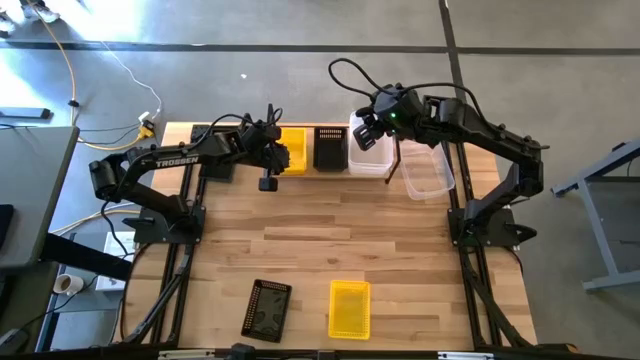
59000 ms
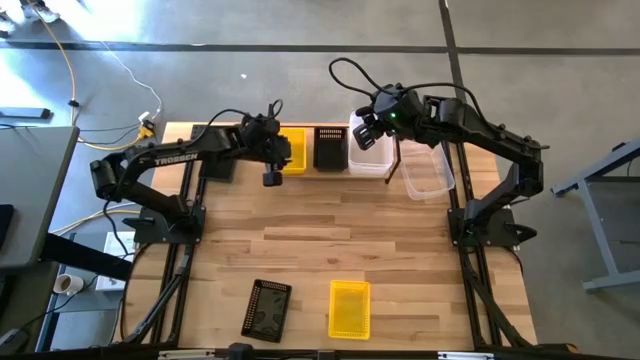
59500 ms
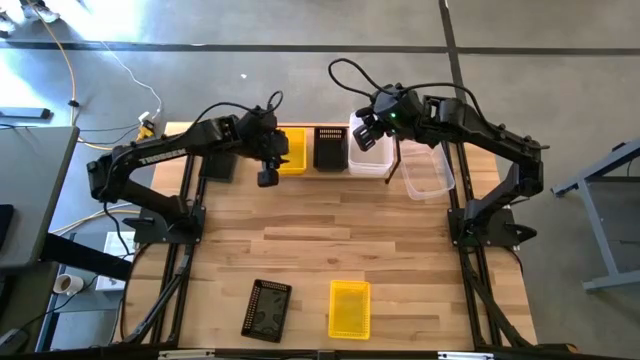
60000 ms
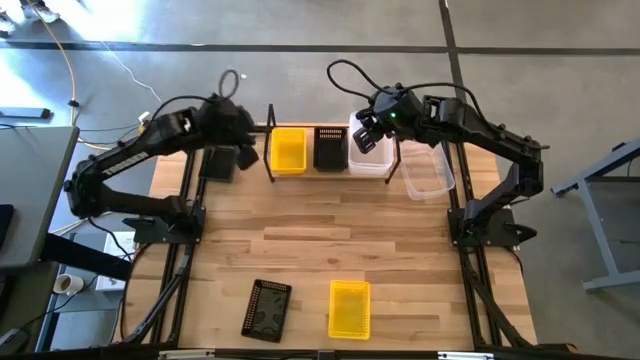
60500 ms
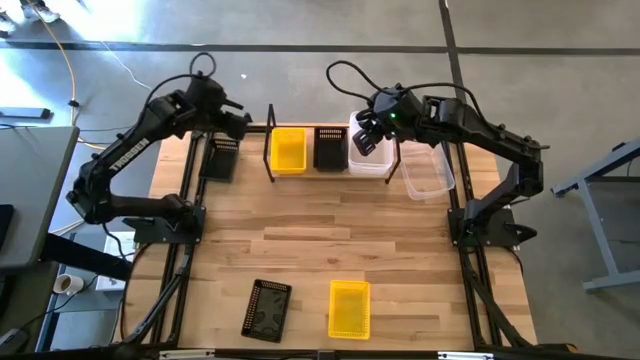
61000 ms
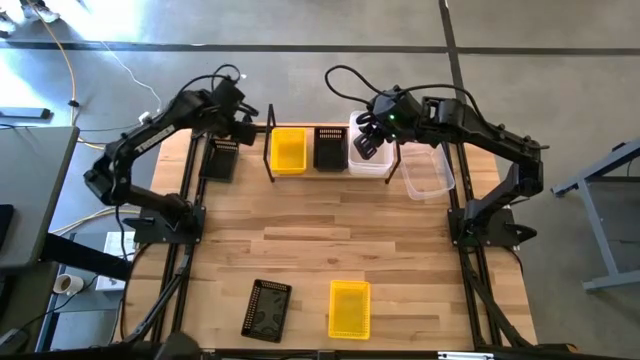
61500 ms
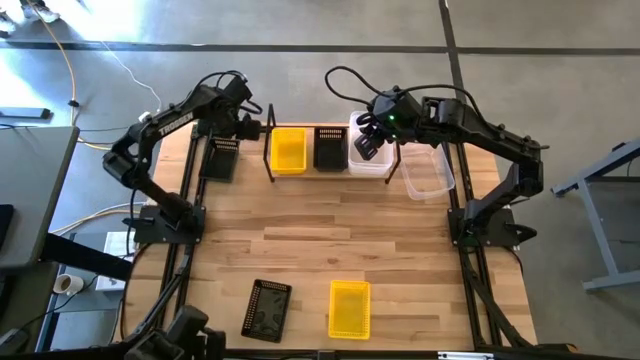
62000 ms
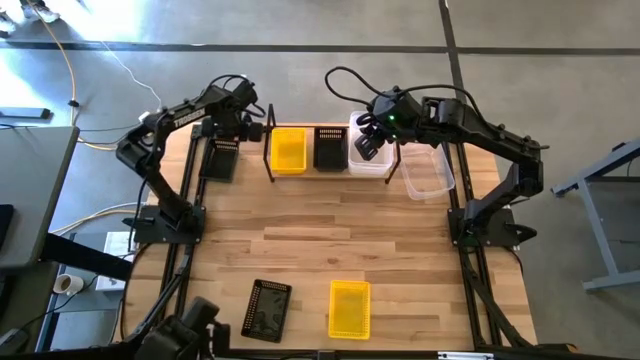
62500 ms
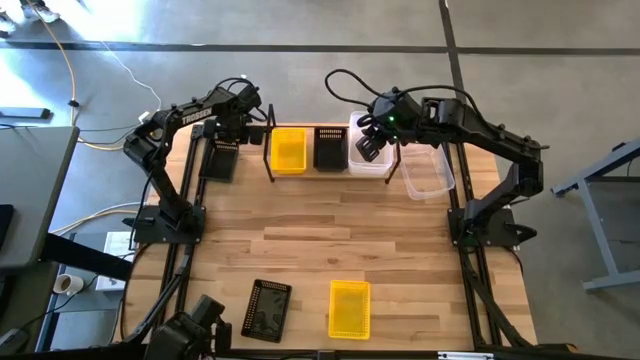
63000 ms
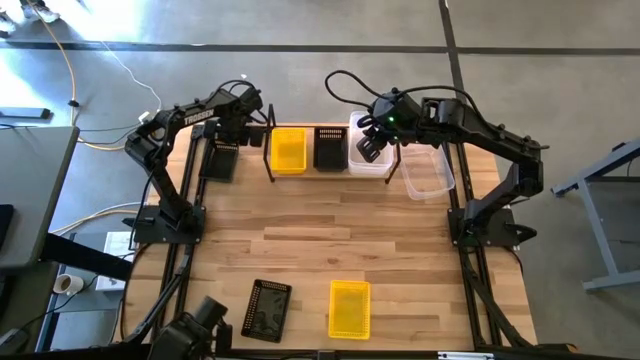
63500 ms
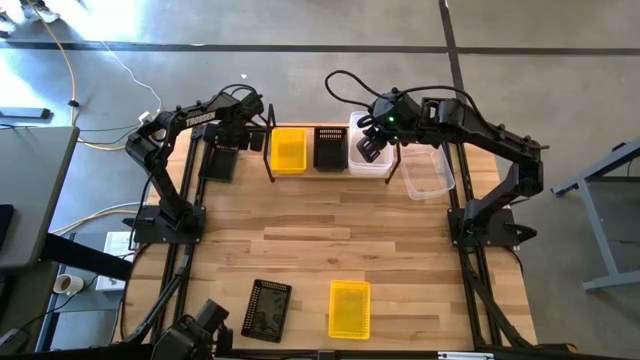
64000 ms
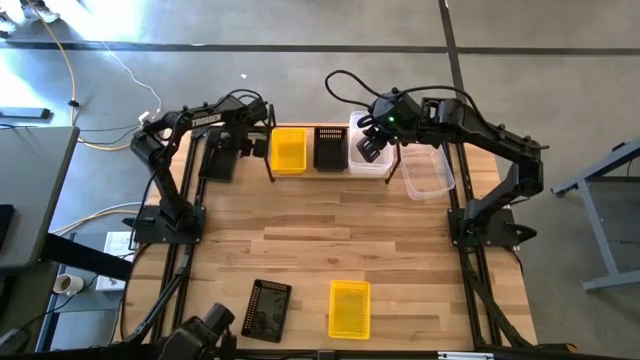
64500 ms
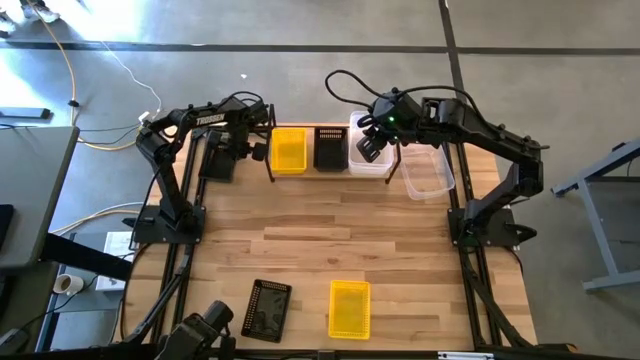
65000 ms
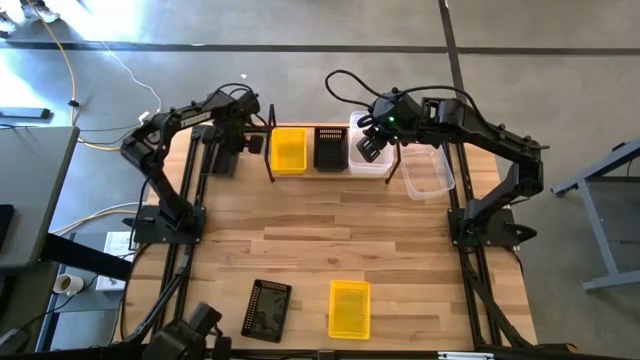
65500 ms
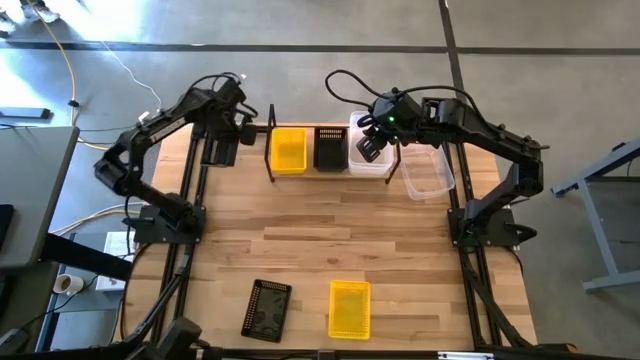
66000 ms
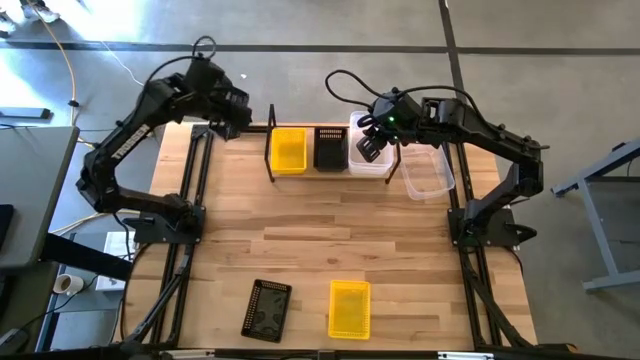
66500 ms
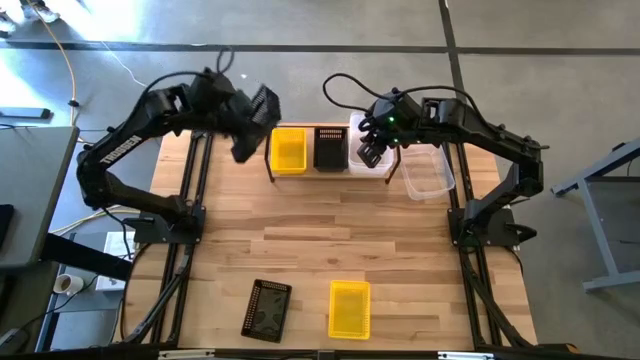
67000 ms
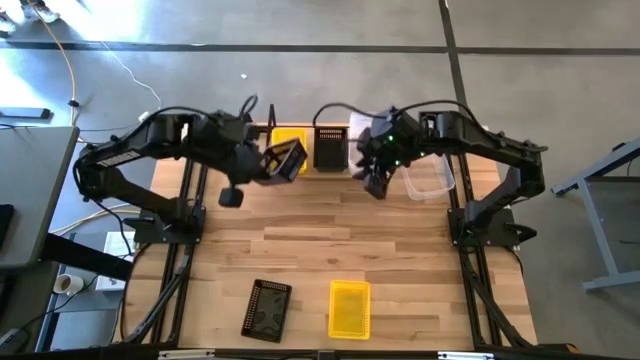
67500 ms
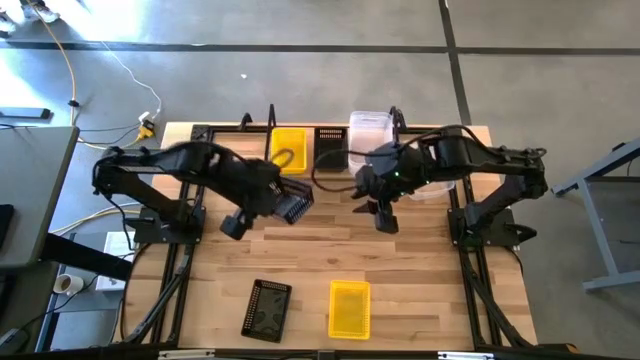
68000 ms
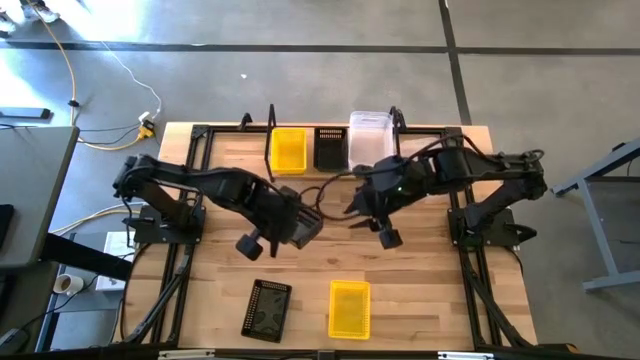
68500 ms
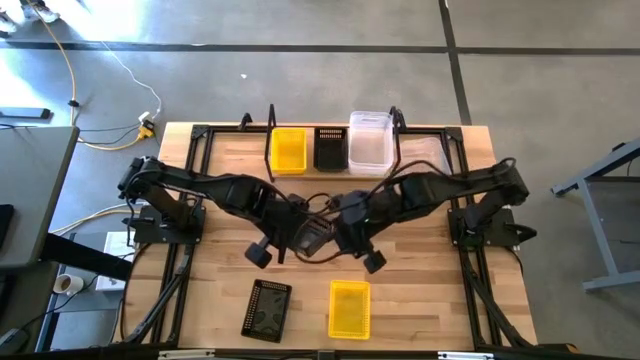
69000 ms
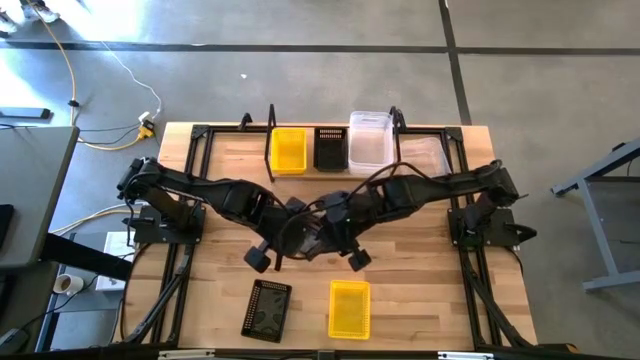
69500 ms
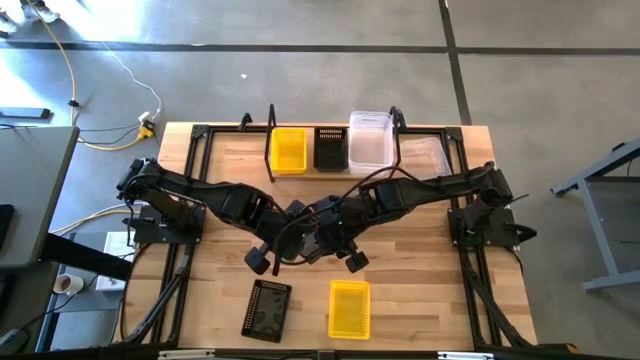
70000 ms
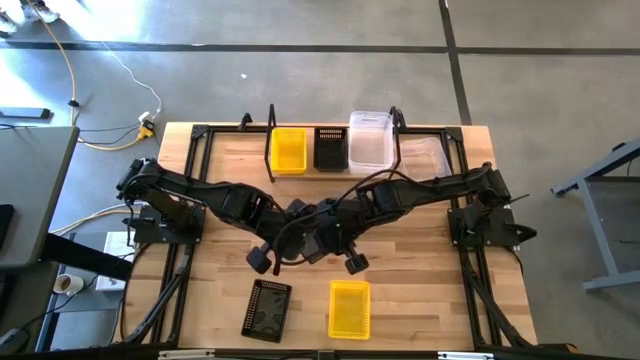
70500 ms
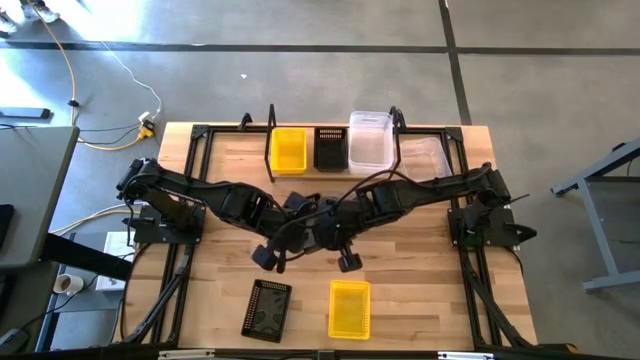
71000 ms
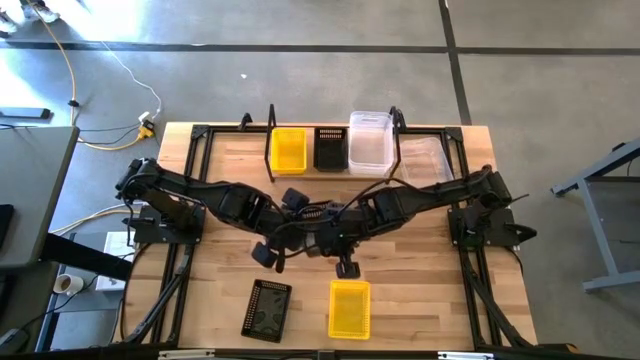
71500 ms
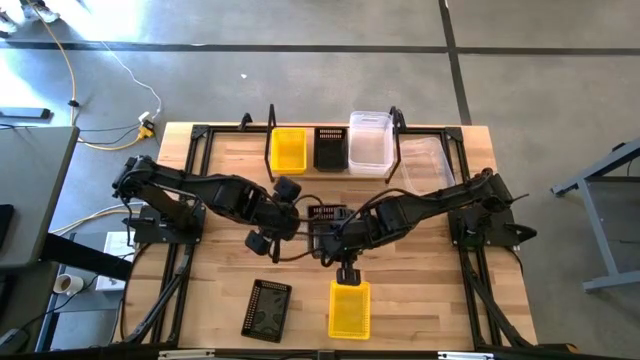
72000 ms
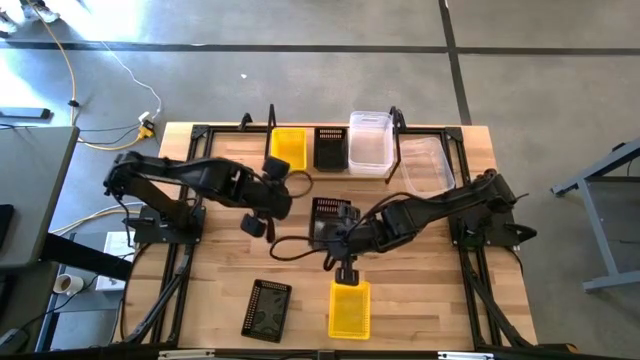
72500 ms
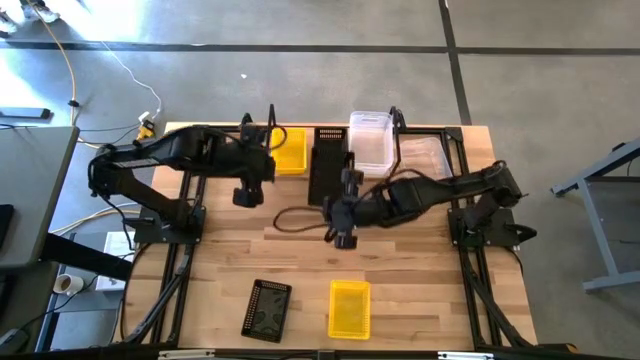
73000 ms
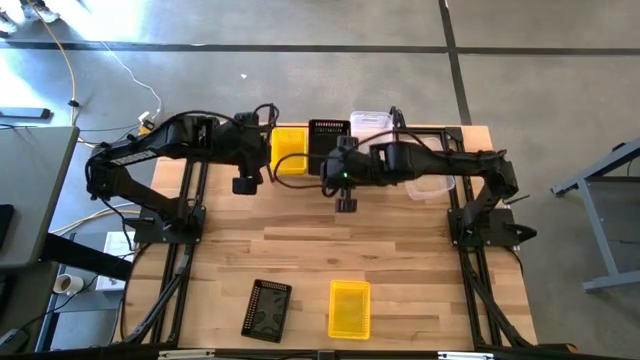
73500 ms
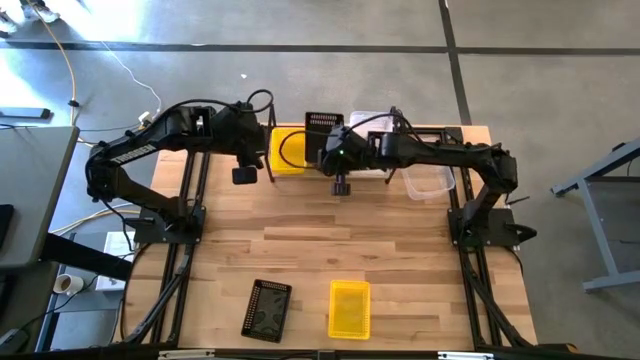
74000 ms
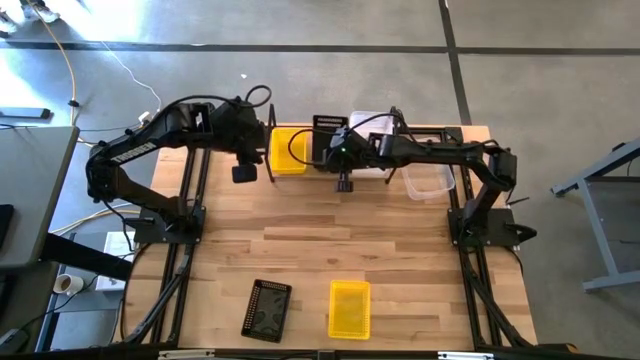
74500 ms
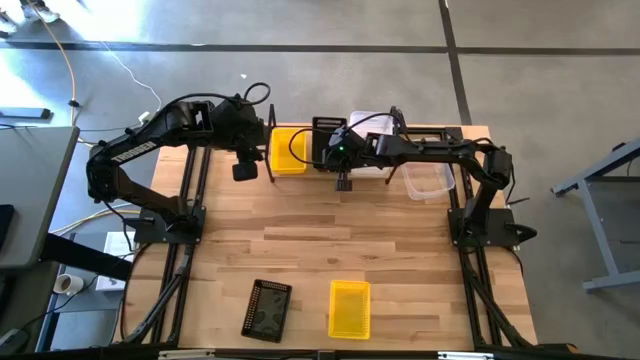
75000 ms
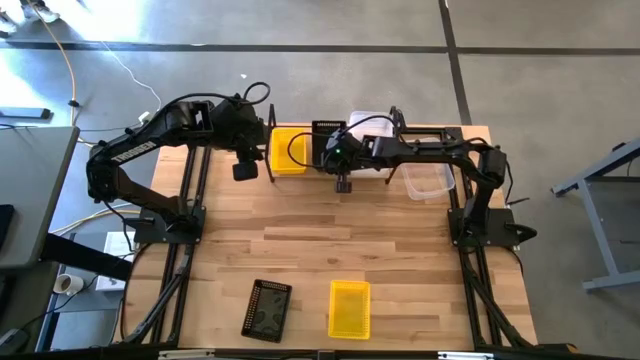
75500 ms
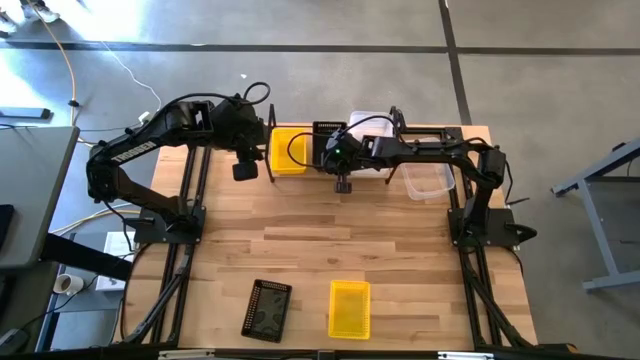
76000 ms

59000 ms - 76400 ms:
Task: Stack baskets on shelf by color
Stack the top black bin on top of the black bin on the shelf

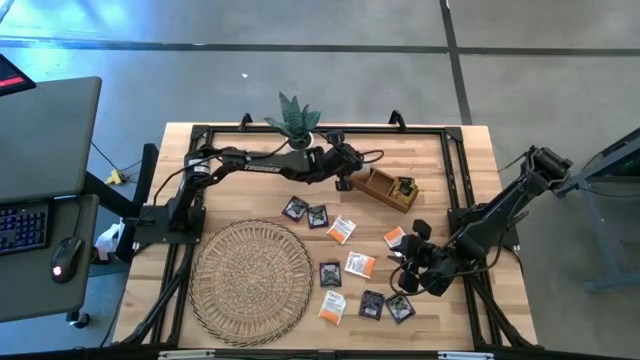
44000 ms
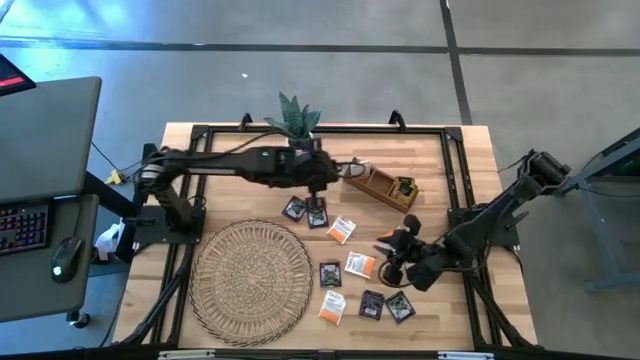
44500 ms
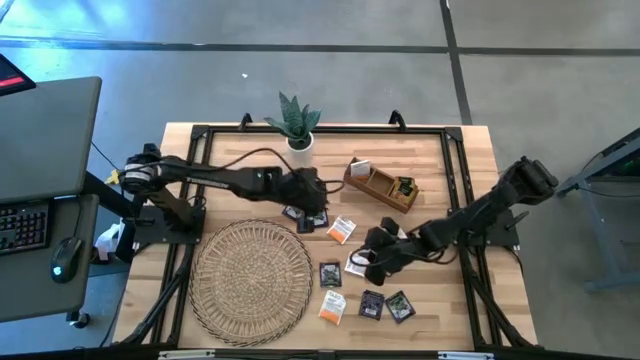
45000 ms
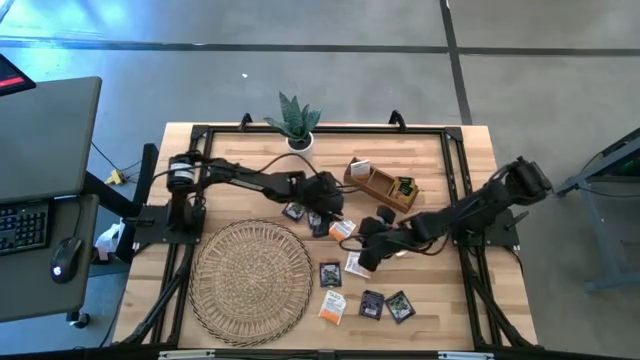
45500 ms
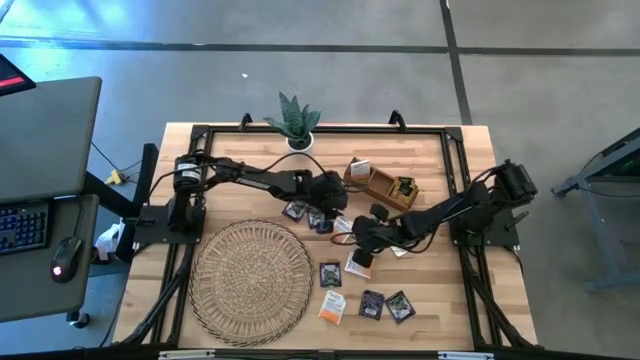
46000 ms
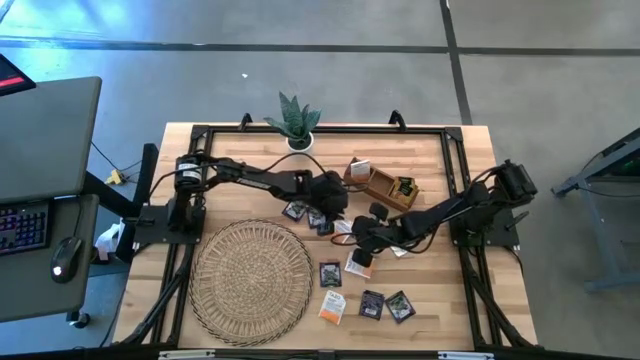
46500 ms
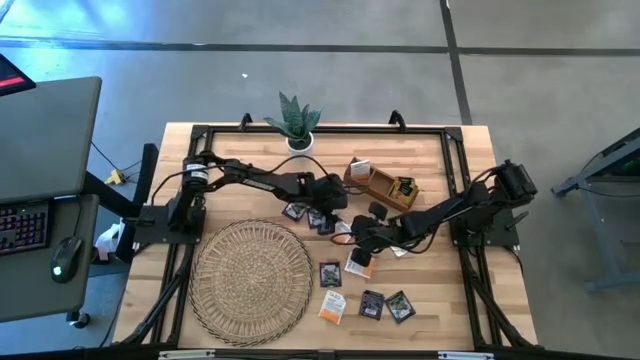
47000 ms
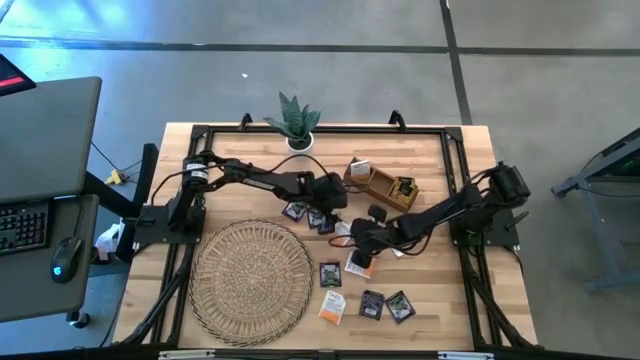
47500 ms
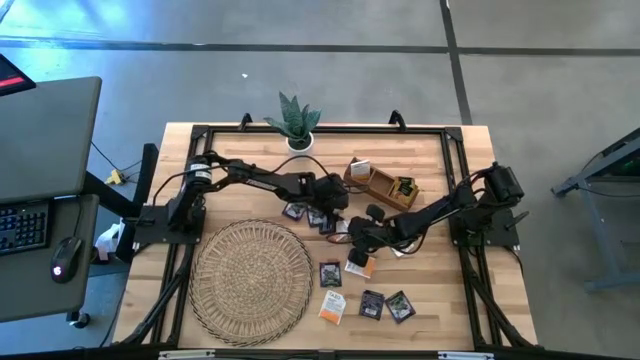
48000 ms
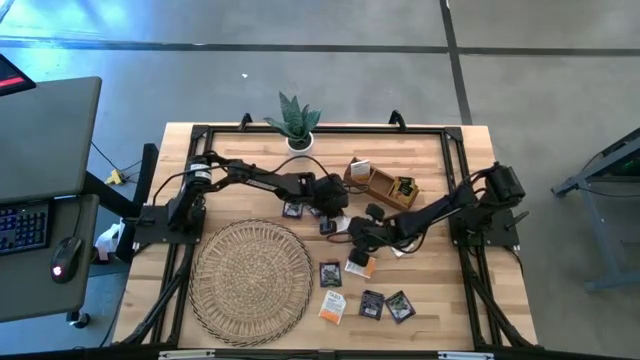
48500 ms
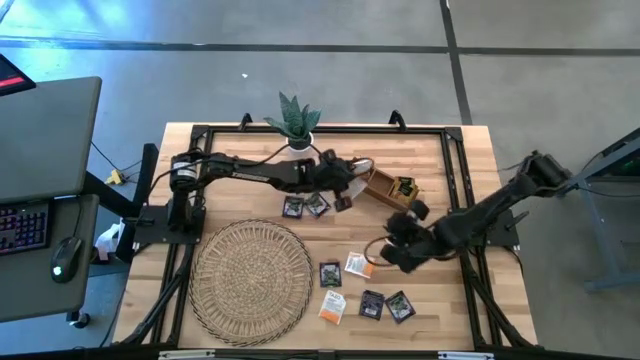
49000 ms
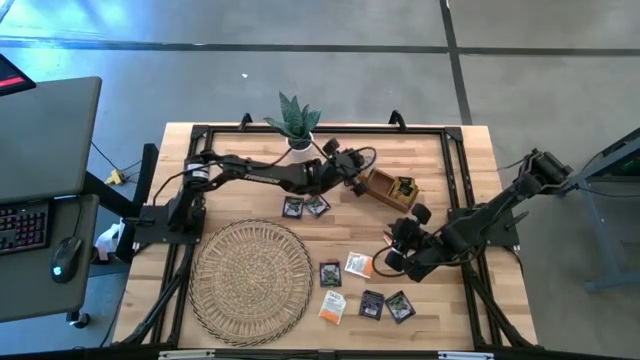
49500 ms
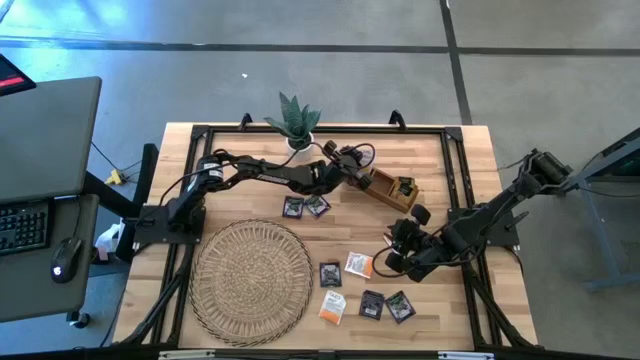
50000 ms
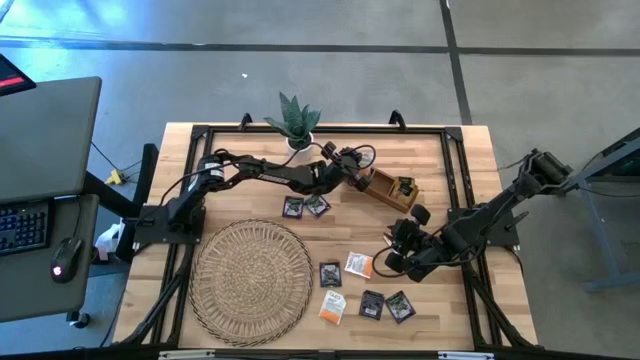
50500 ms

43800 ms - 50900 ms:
Task: Pick & Place Tea
Put the white tea bag into the left section of the wooden organizer
